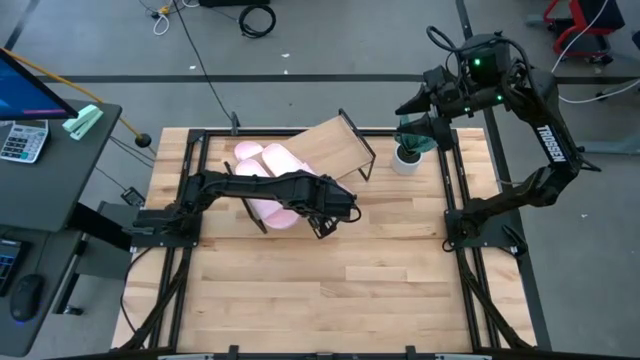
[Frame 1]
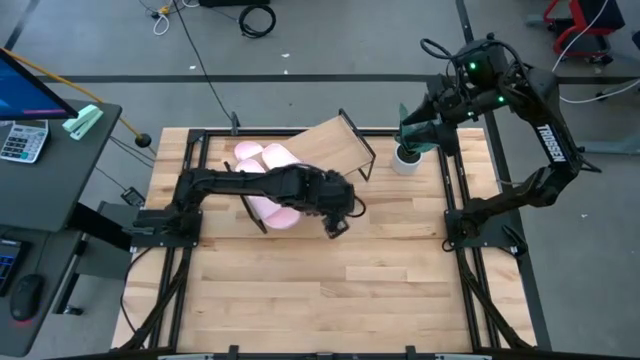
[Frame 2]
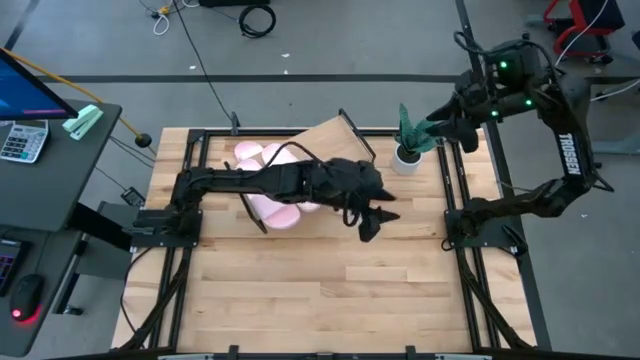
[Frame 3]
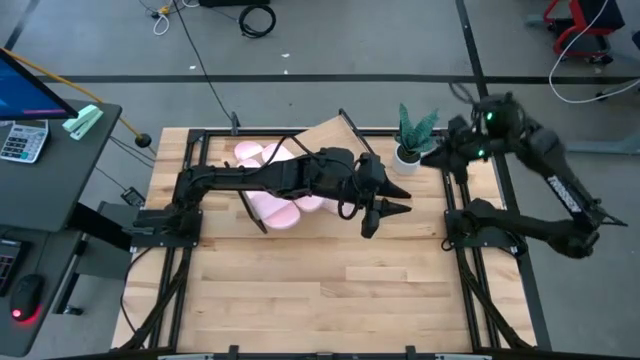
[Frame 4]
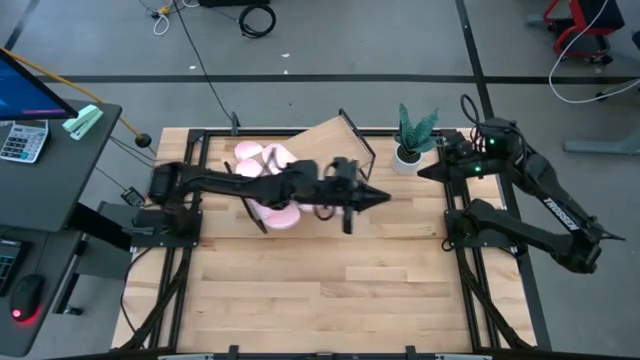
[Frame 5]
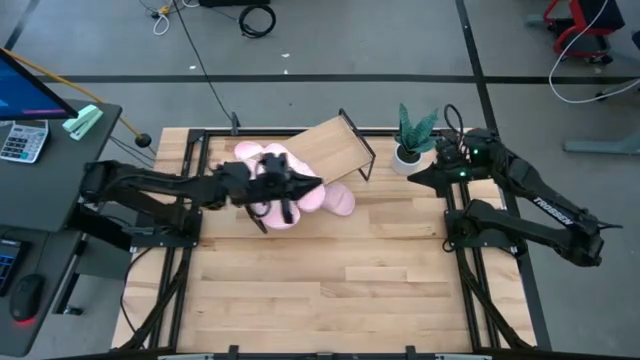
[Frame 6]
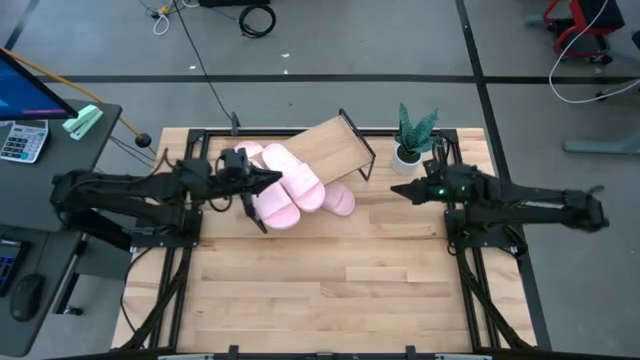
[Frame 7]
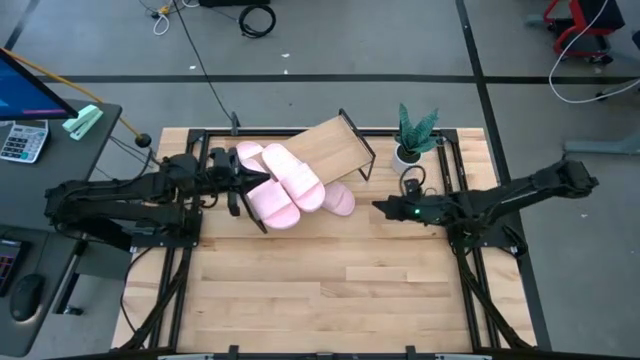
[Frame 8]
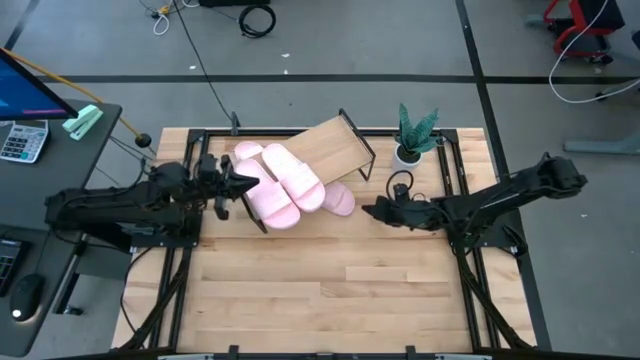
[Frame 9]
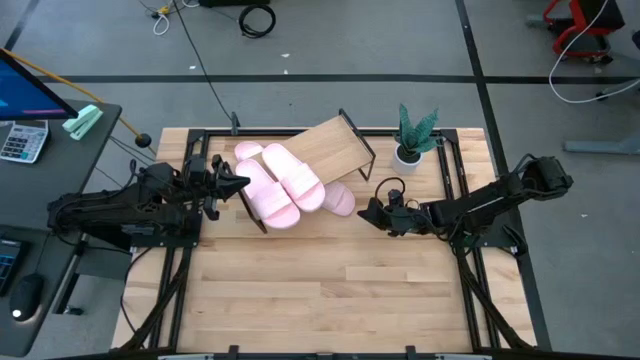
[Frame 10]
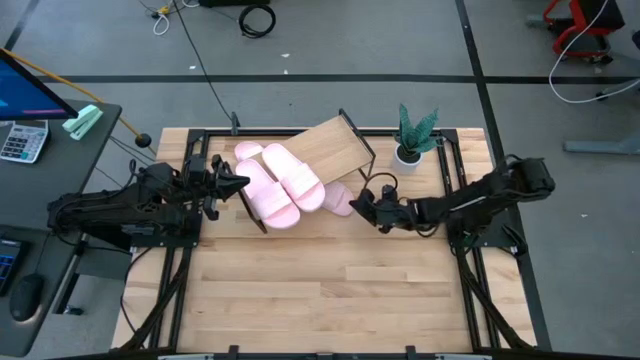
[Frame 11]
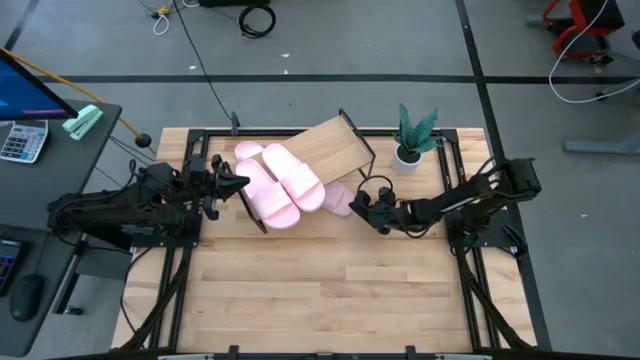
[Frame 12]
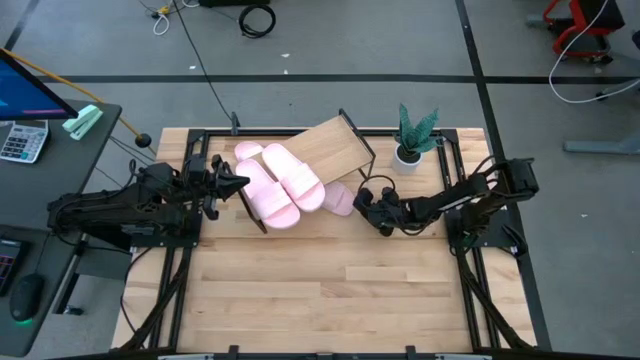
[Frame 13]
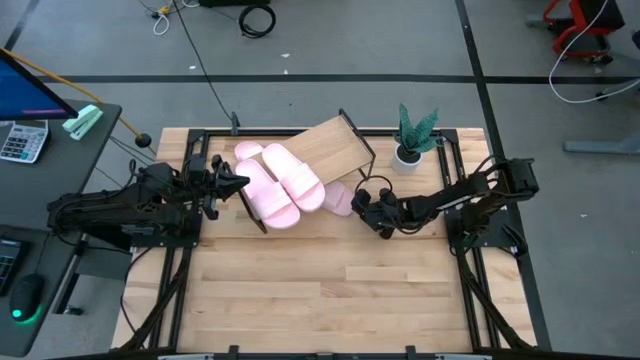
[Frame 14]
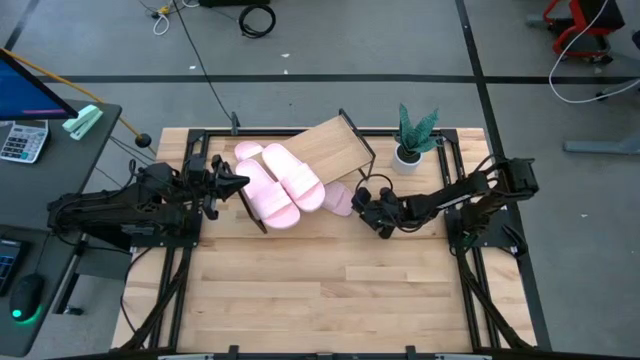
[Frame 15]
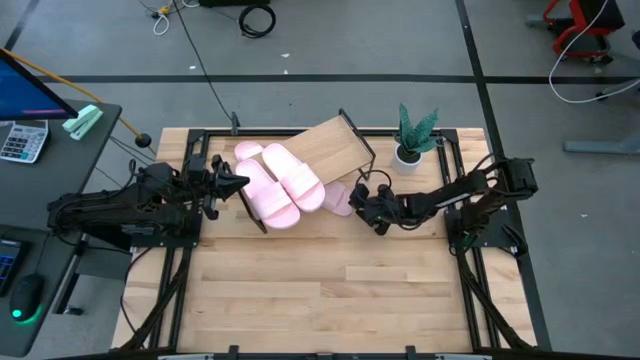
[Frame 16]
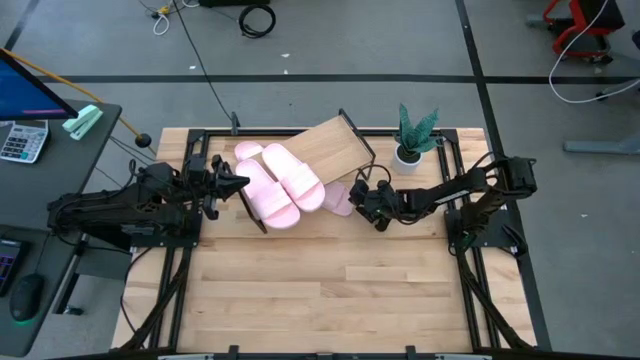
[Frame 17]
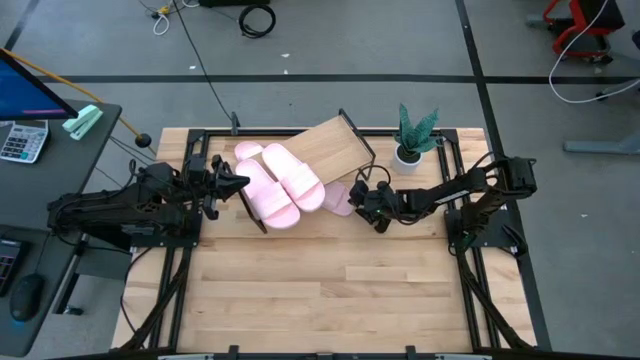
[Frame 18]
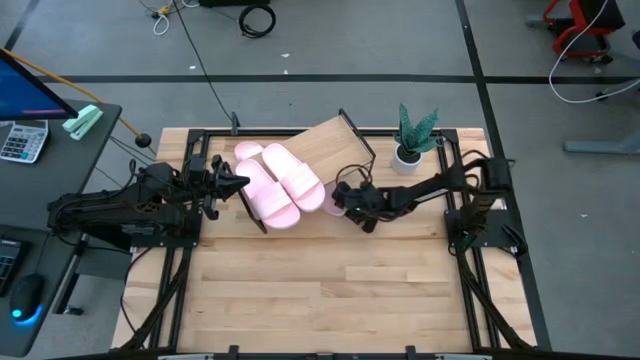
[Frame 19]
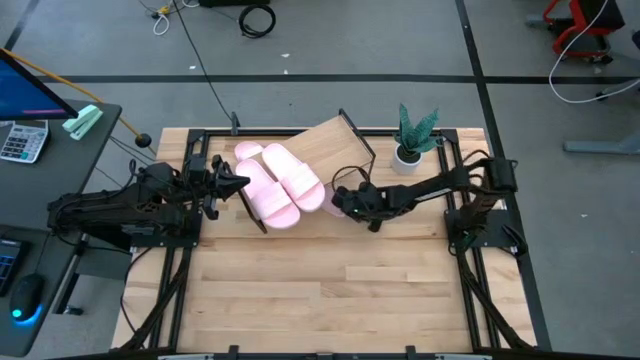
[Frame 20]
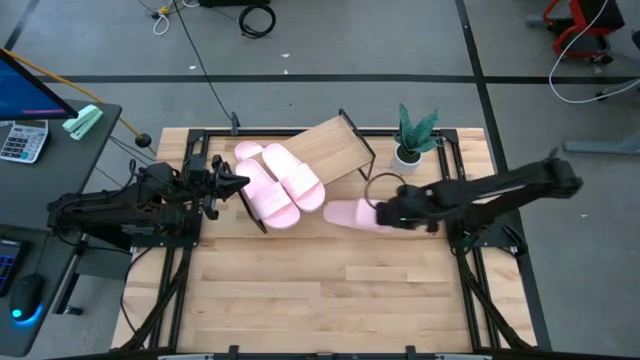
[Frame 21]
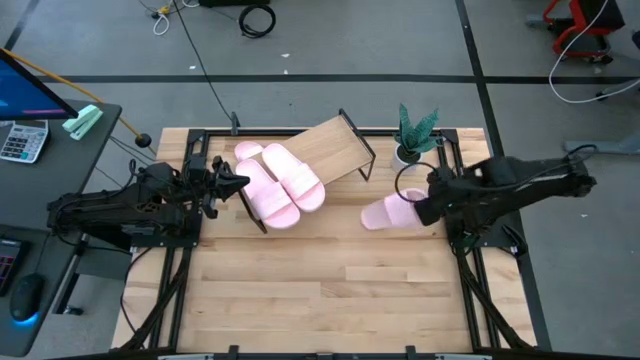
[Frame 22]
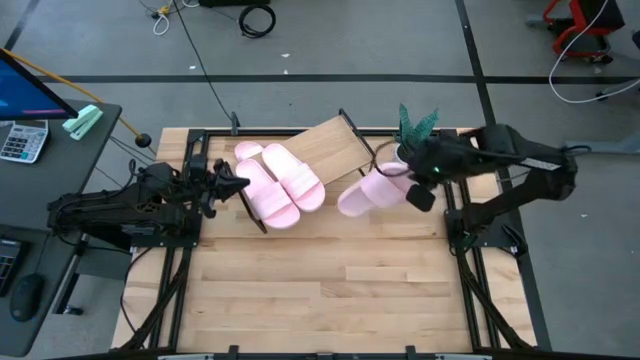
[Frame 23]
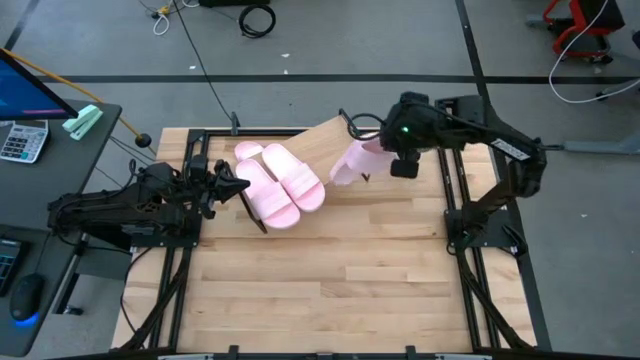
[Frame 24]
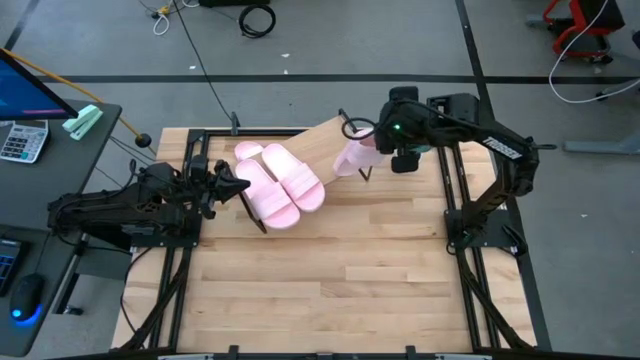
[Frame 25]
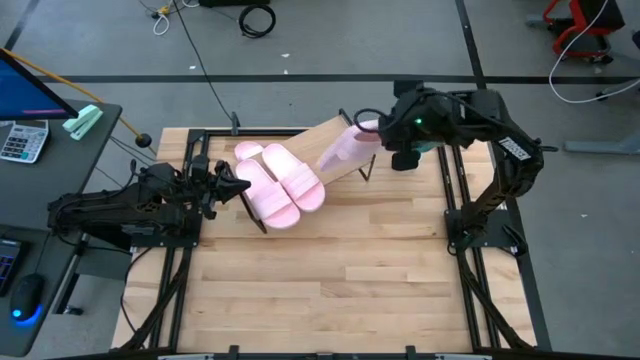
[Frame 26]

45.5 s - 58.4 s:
Task: Pick and place slides into the shelf
Put the pink slipper on the shelf

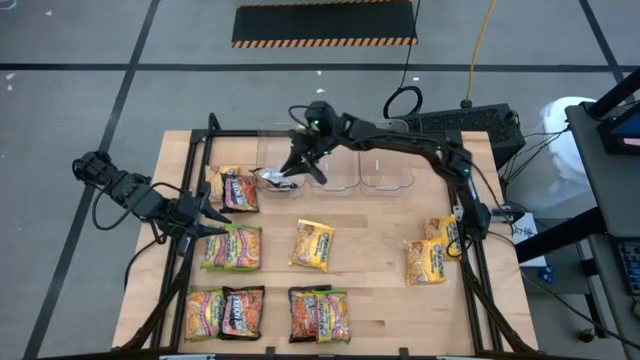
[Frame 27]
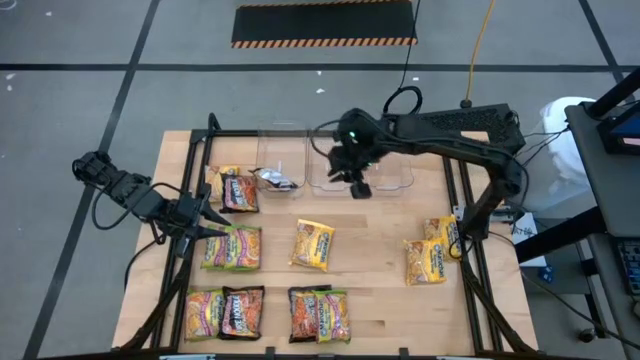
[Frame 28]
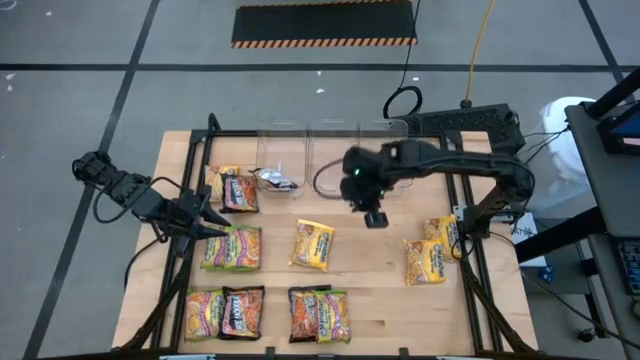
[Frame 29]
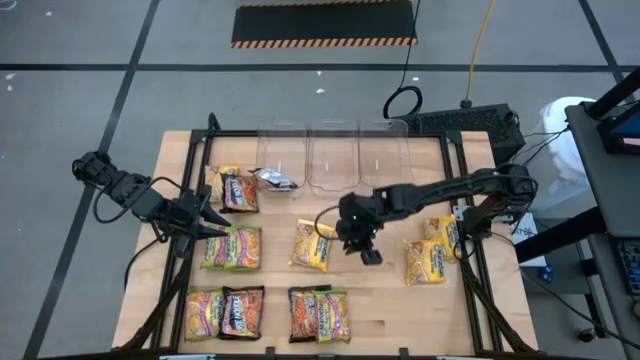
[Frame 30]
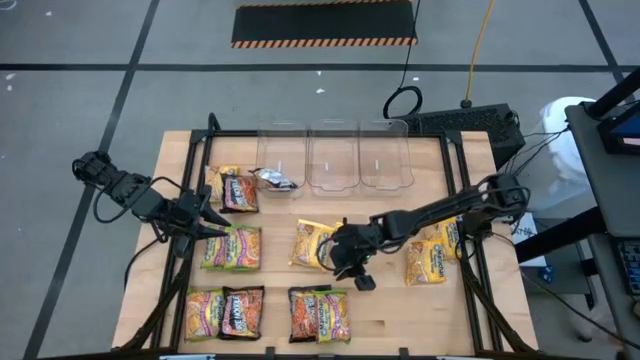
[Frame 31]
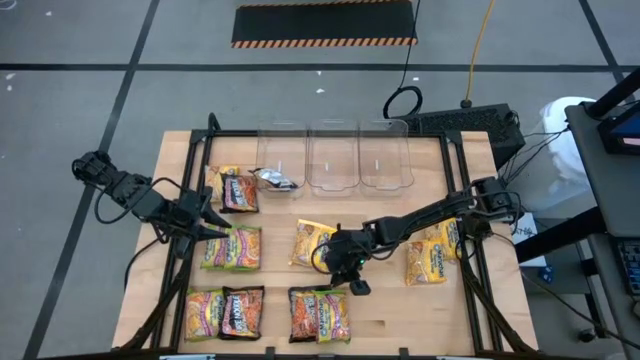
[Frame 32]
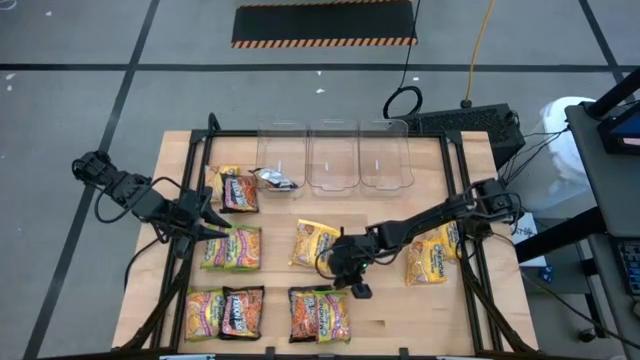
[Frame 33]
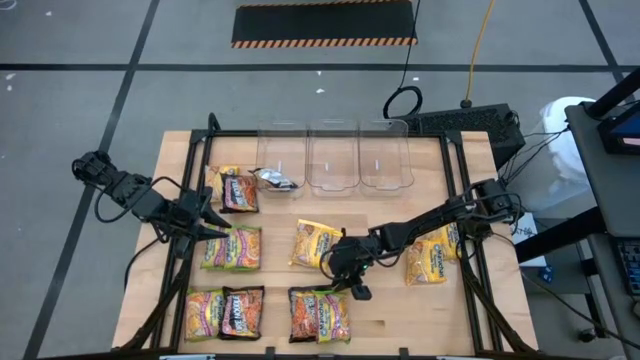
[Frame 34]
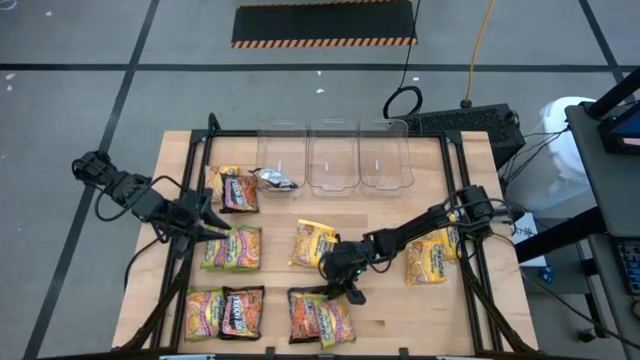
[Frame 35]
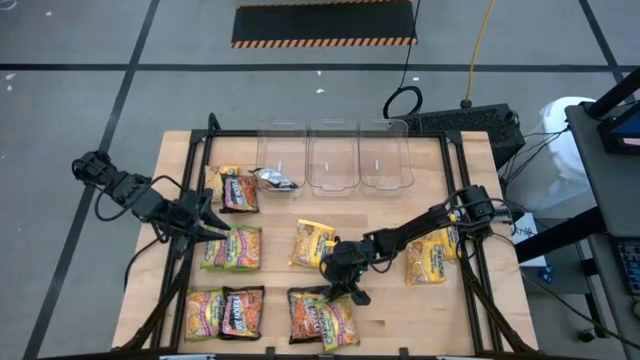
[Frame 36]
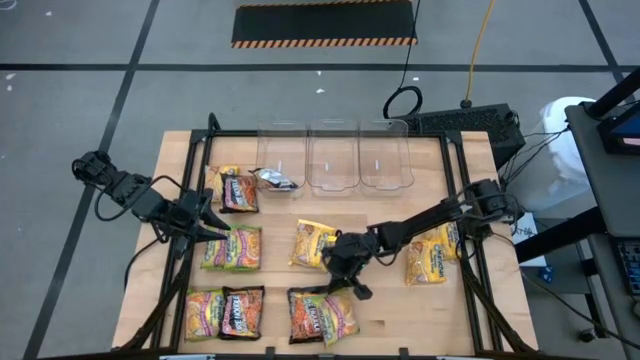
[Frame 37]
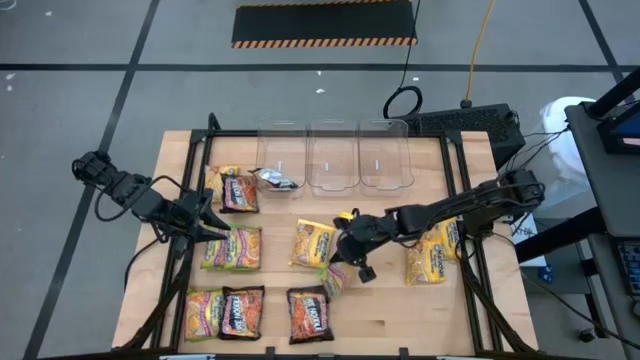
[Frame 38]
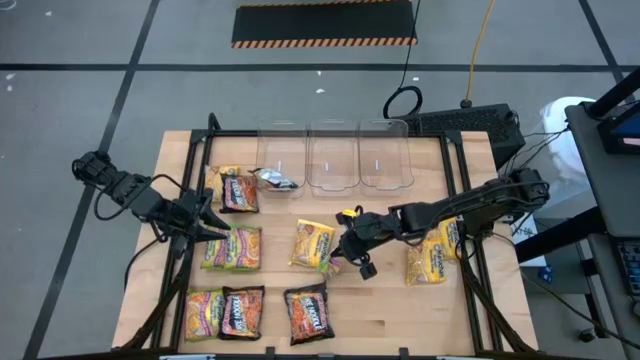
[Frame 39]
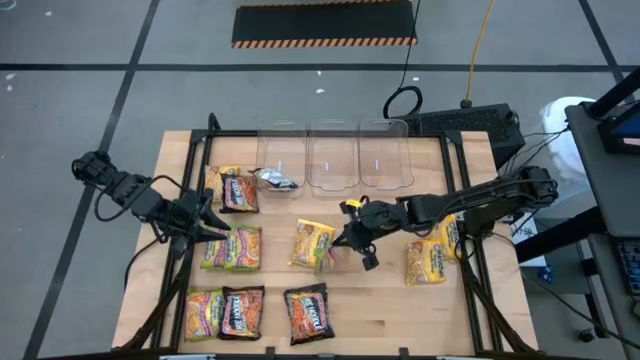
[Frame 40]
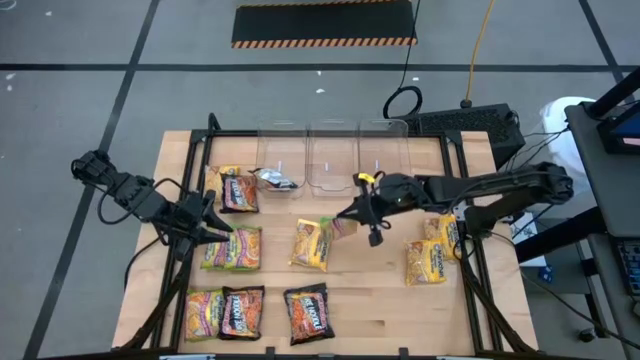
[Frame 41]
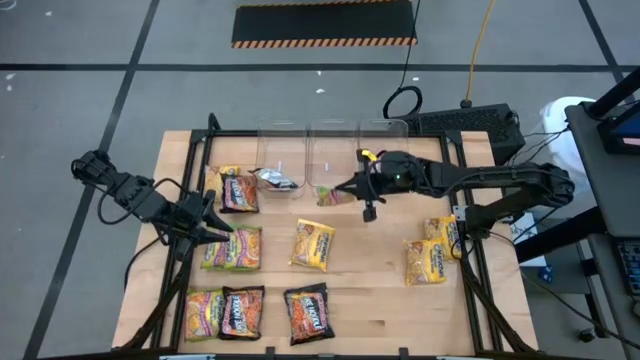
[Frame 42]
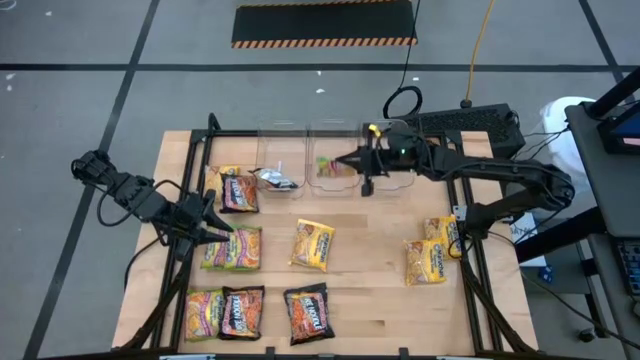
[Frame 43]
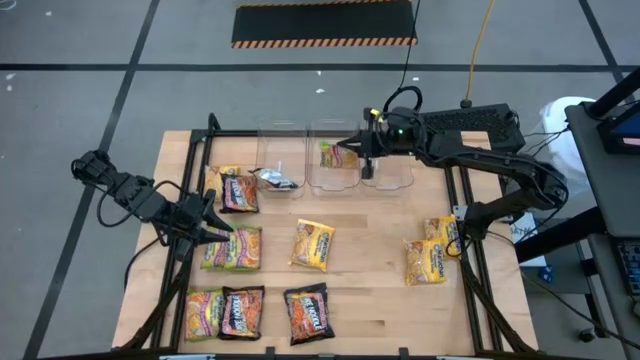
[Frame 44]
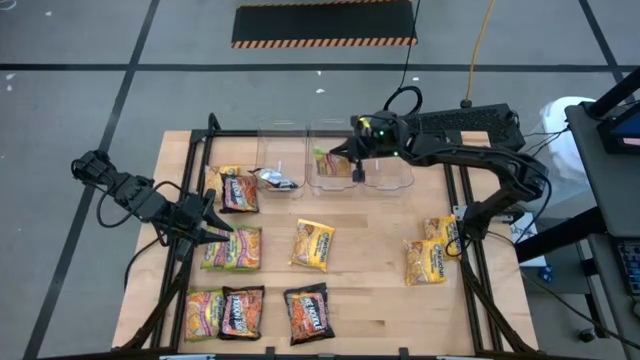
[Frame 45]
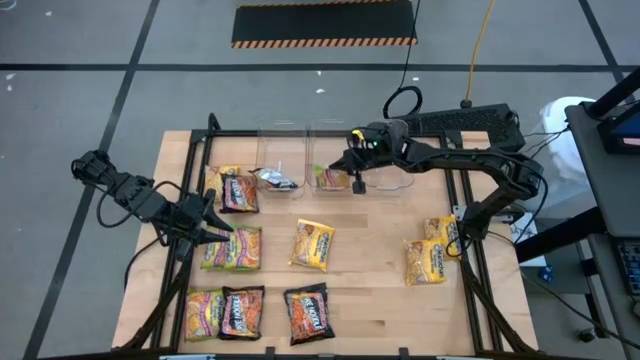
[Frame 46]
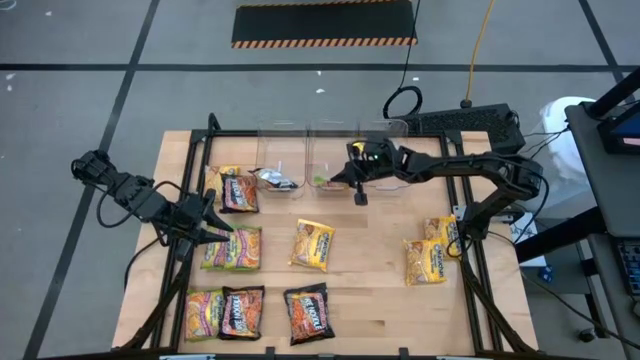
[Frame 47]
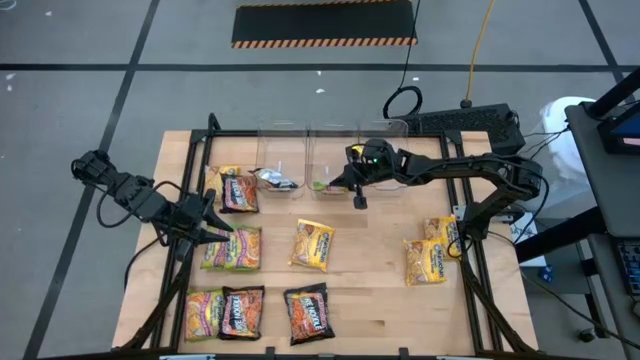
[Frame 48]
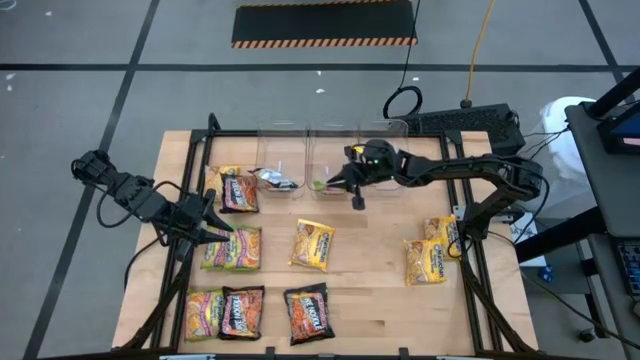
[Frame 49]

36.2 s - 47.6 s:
Task: Sort Maruchan noodles
Put the green noodle pack into the middle transparent bin
